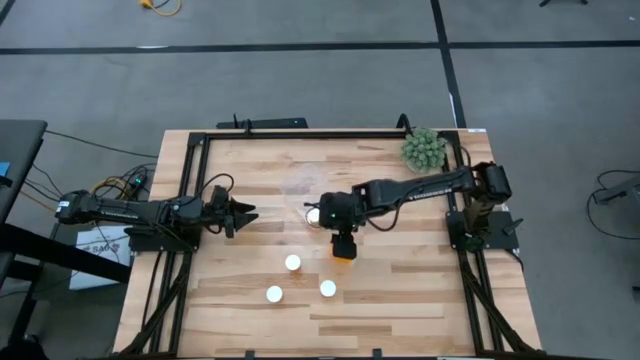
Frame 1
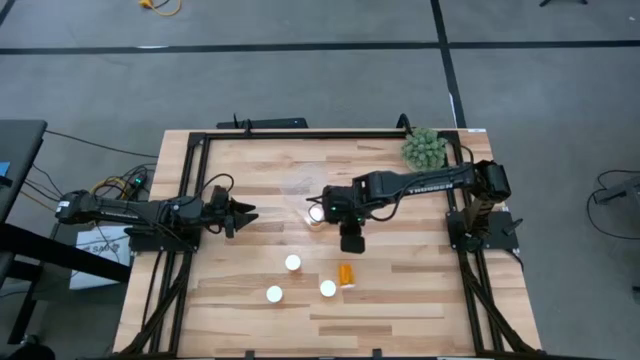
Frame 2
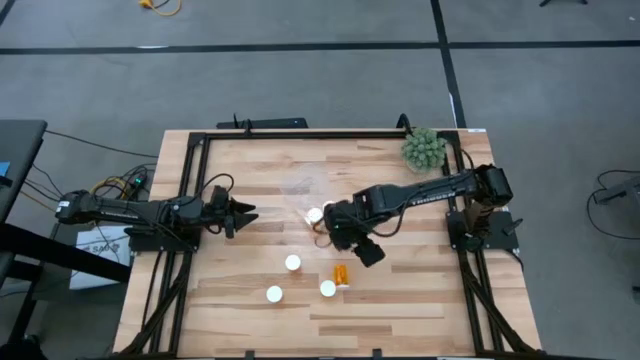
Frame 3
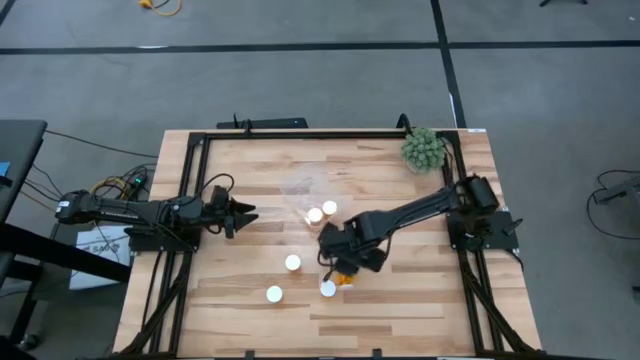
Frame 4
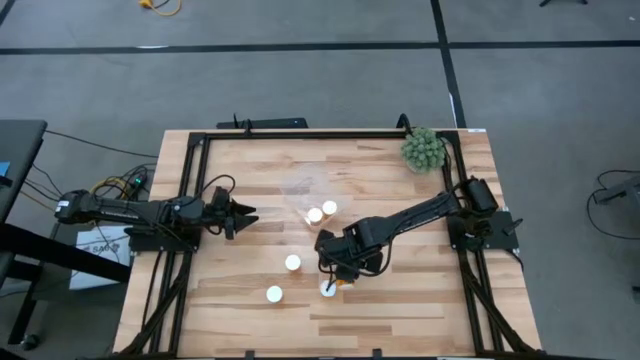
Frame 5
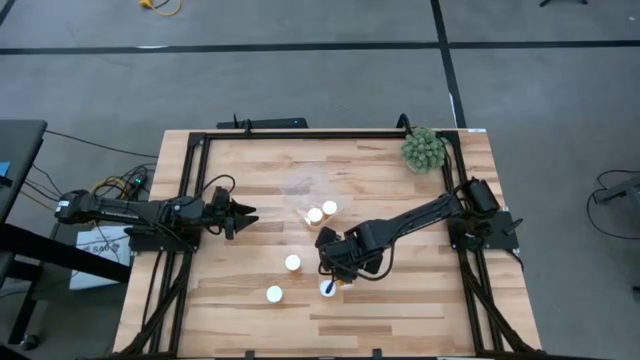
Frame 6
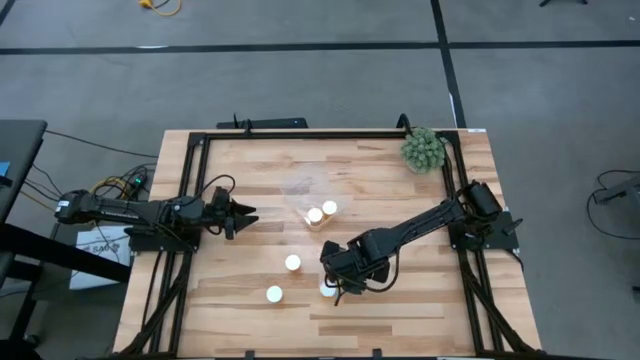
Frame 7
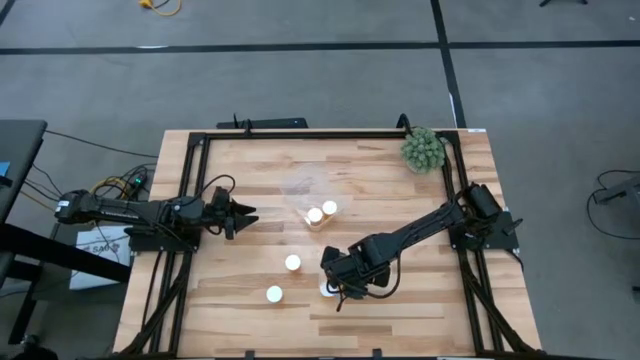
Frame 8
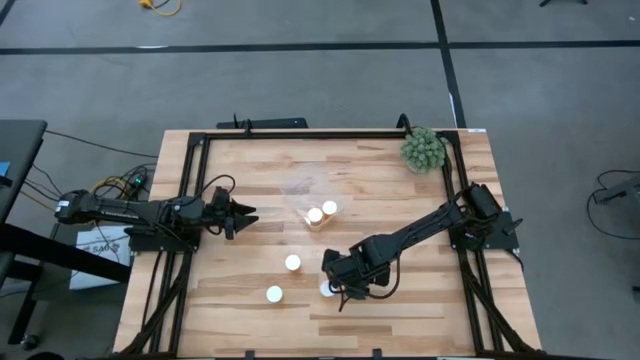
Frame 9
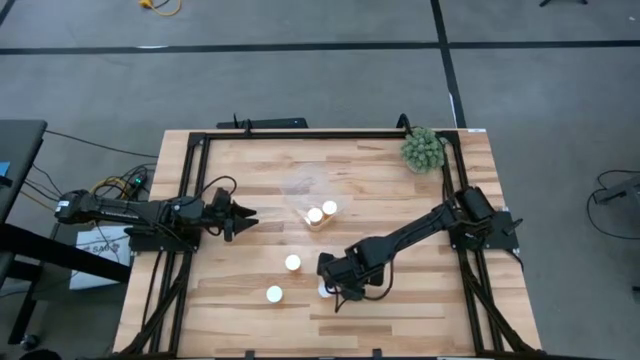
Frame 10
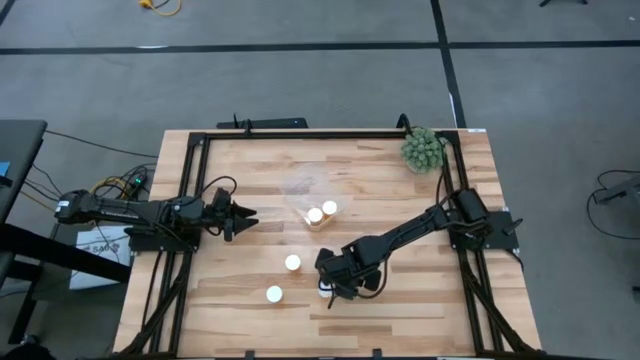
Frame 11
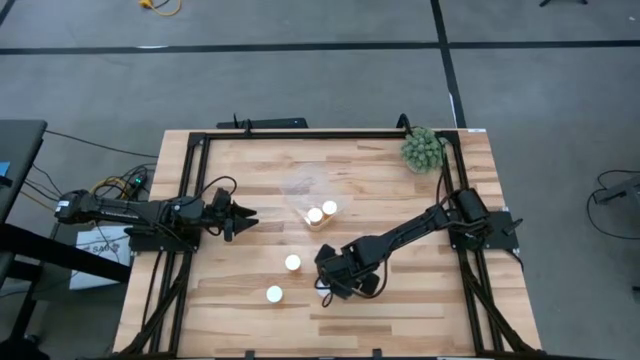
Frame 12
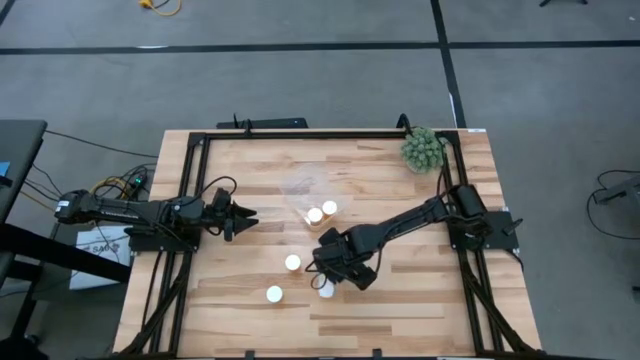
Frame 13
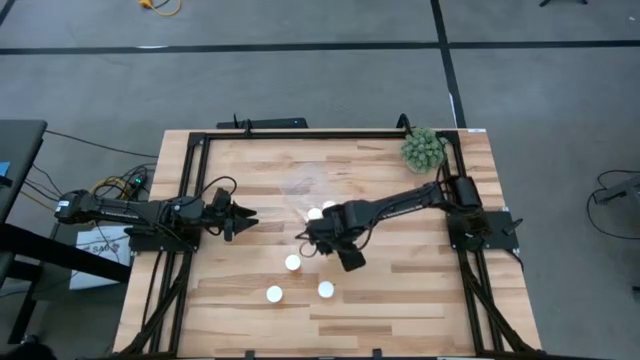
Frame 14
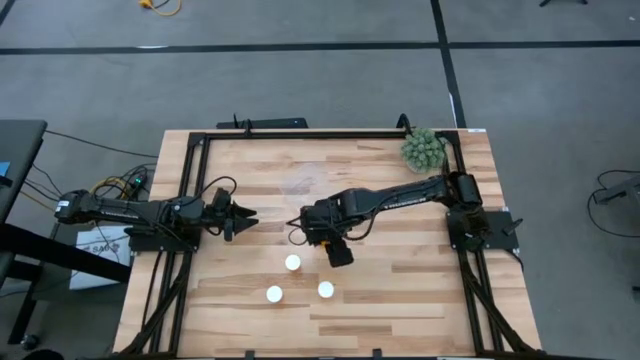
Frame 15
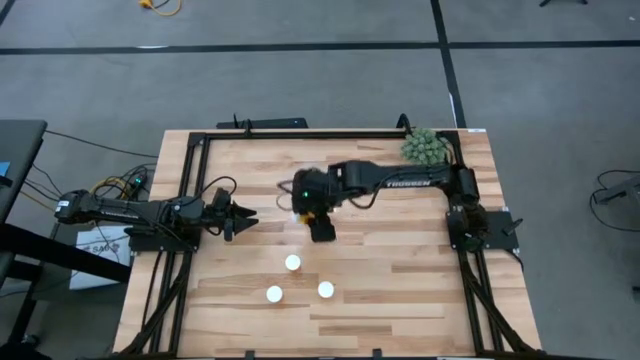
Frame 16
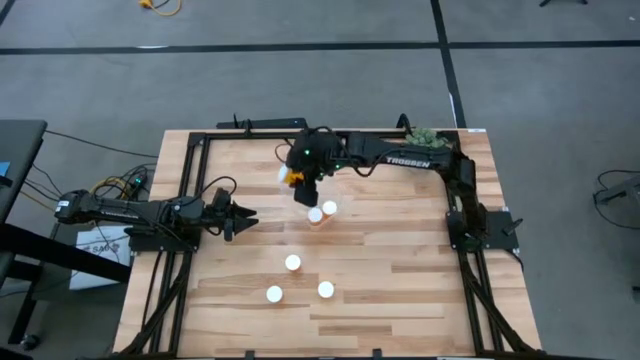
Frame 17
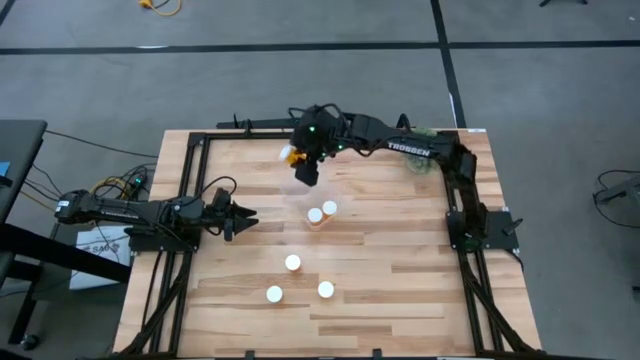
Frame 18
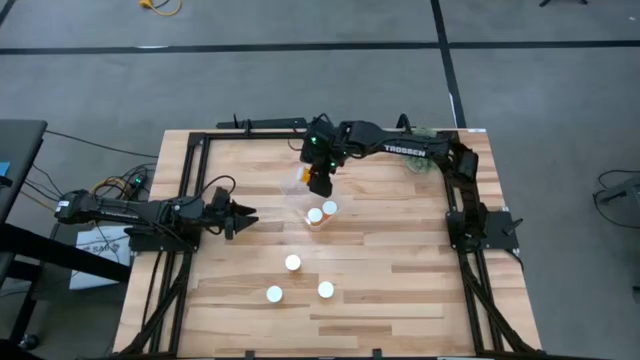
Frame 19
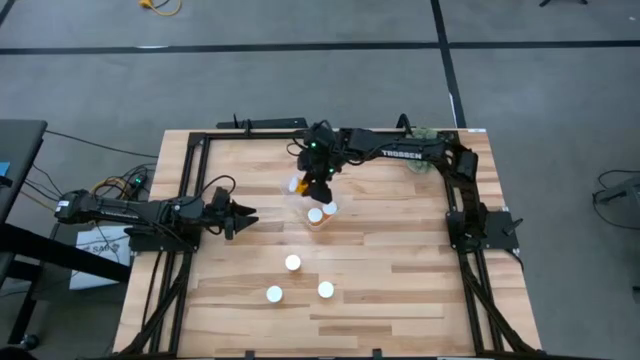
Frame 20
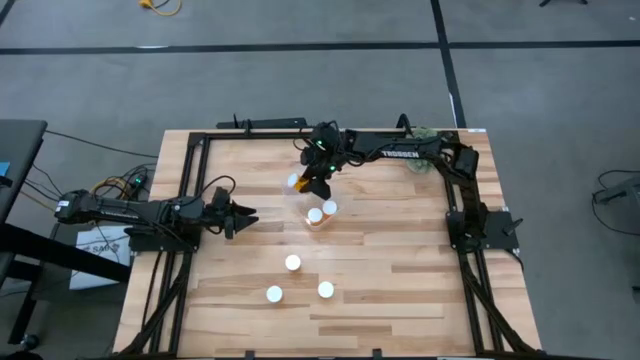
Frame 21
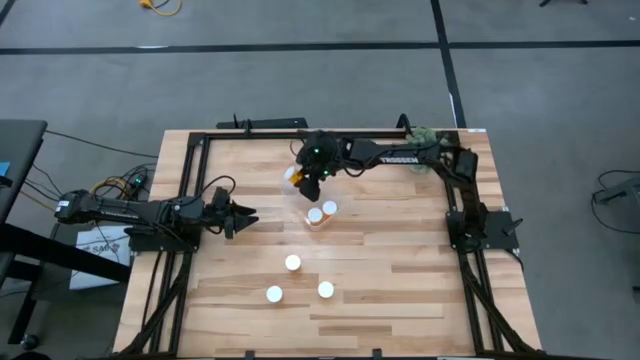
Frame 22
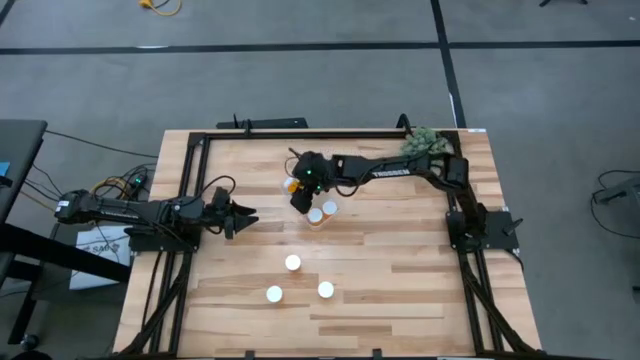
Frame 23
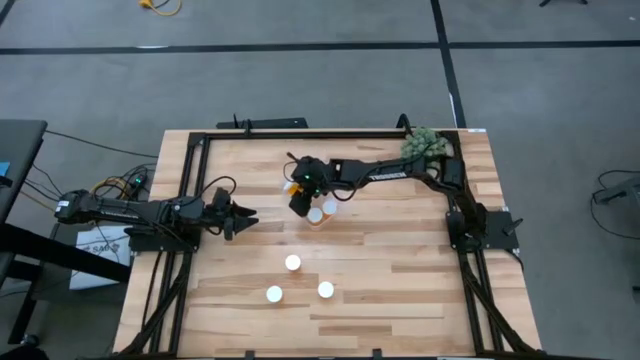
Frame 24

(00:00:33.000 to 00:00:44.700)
Task: Pick and place pill bottles into a basket
Put the orange medicine bottle into the transparent bin

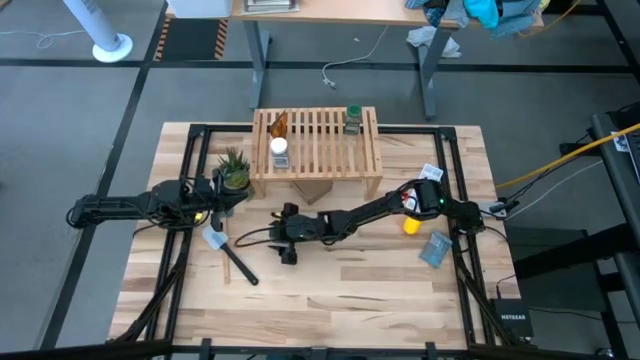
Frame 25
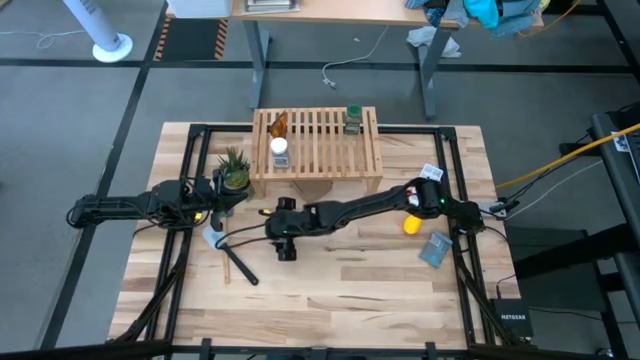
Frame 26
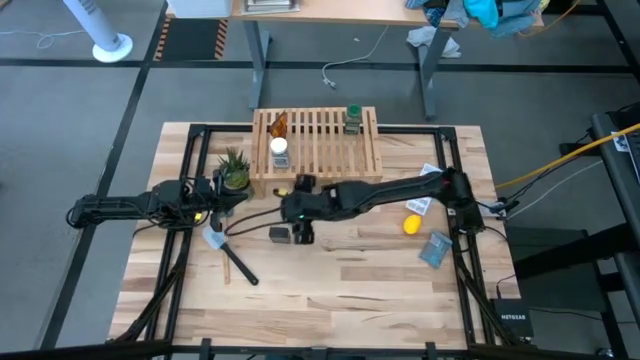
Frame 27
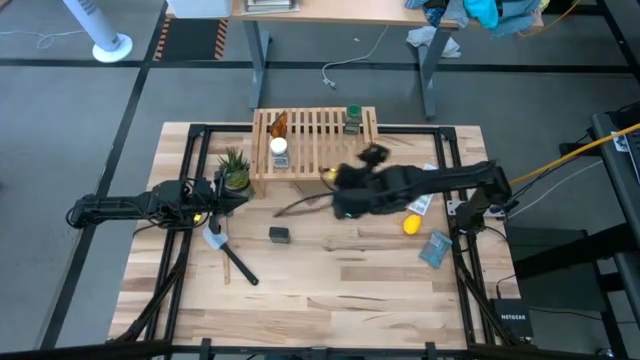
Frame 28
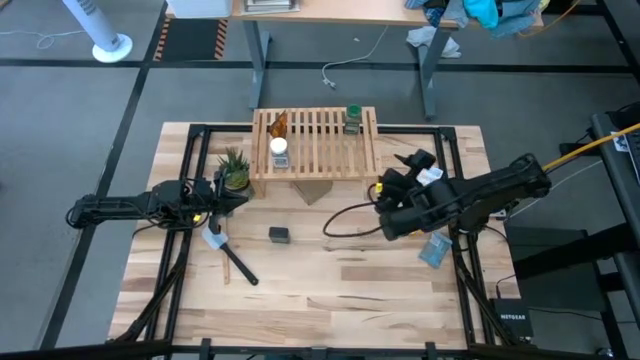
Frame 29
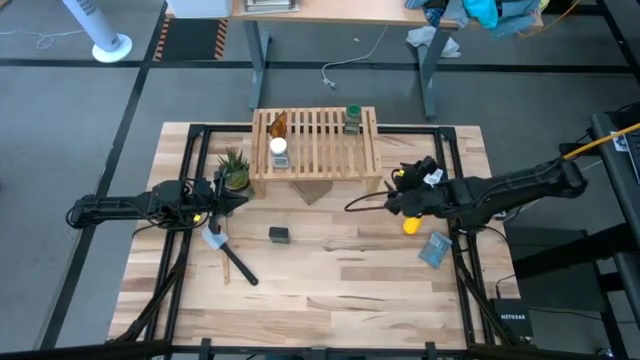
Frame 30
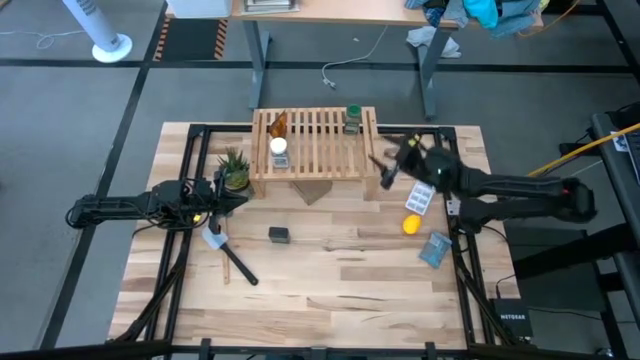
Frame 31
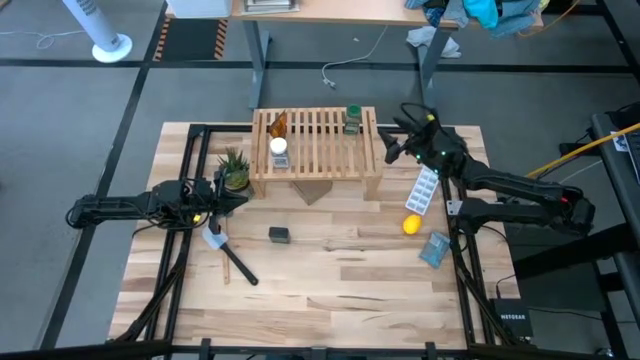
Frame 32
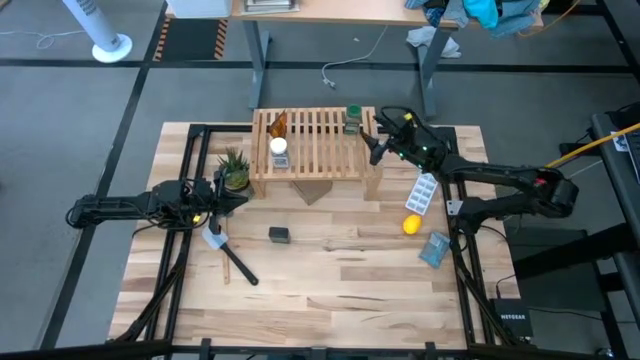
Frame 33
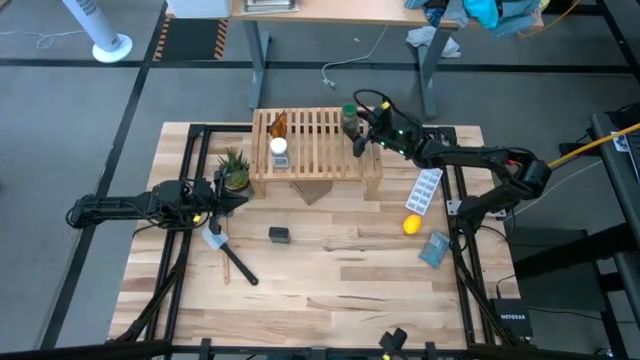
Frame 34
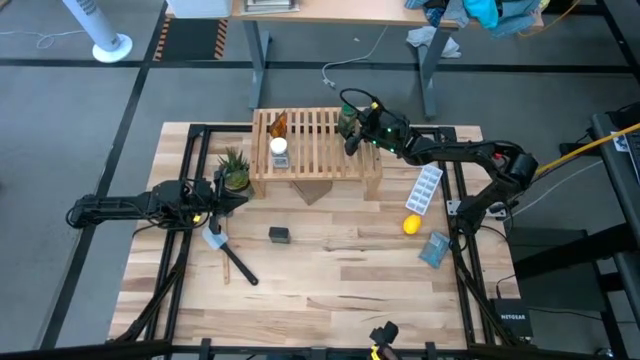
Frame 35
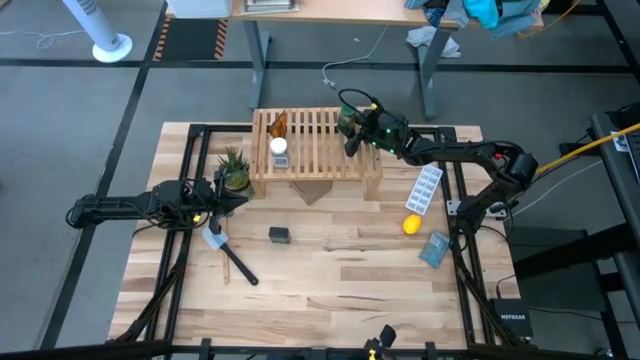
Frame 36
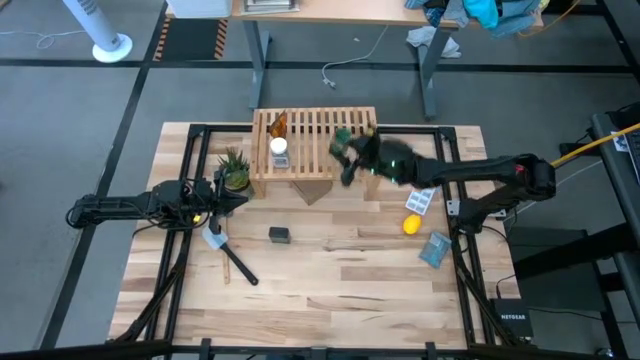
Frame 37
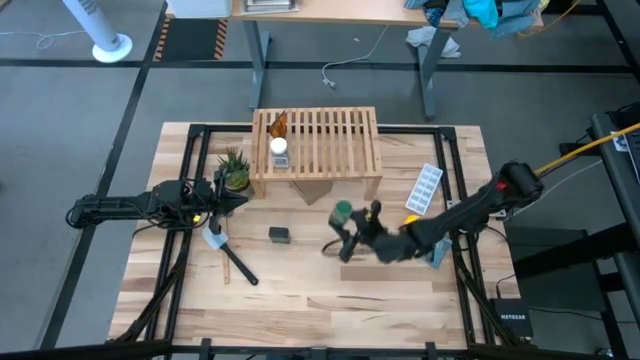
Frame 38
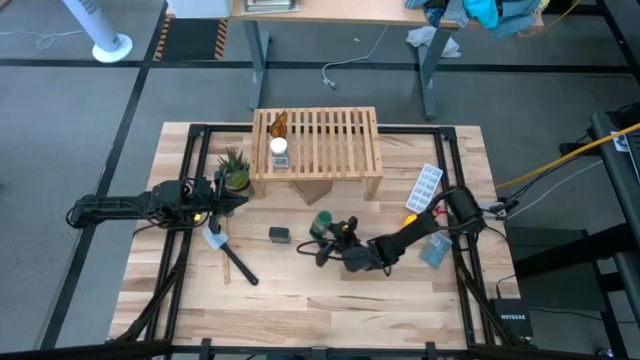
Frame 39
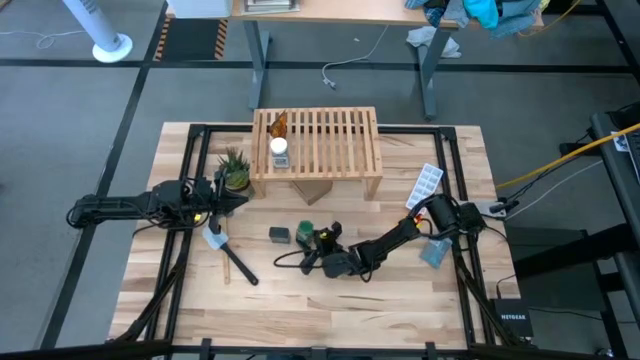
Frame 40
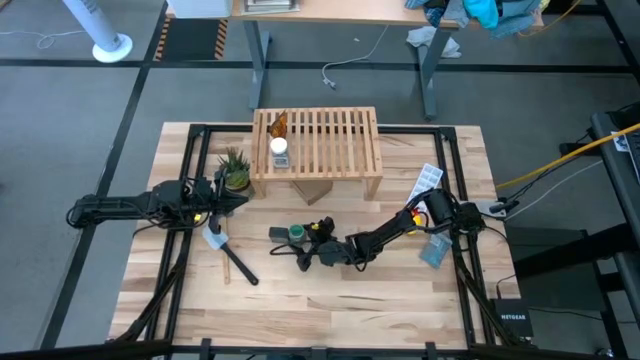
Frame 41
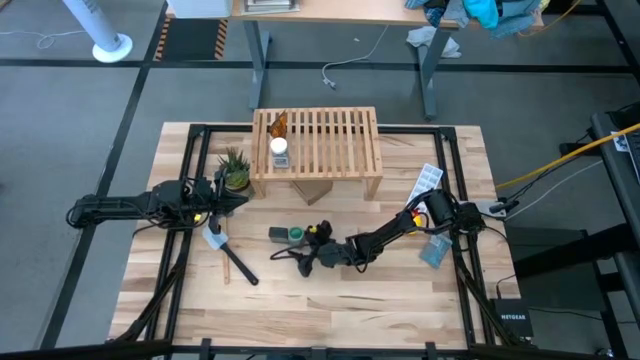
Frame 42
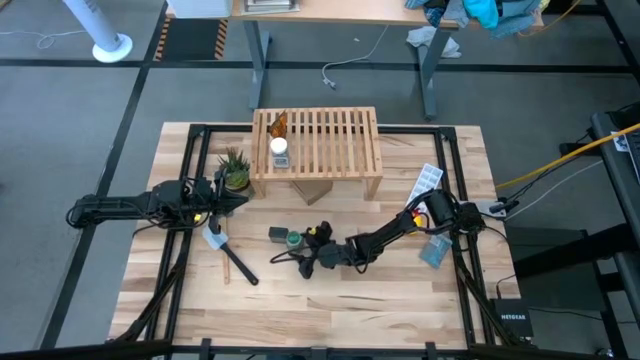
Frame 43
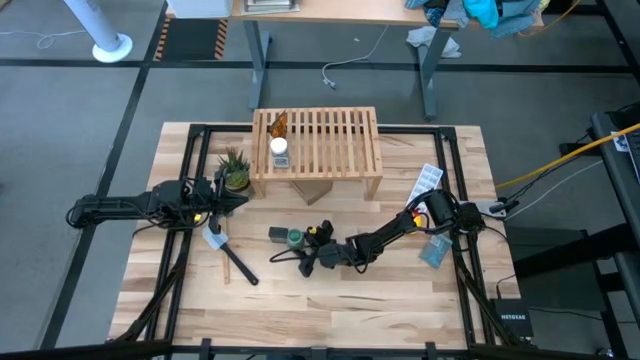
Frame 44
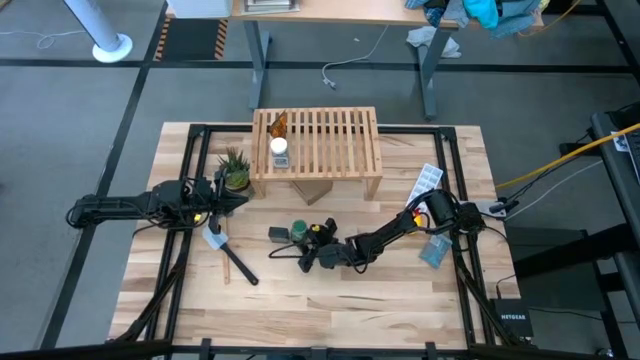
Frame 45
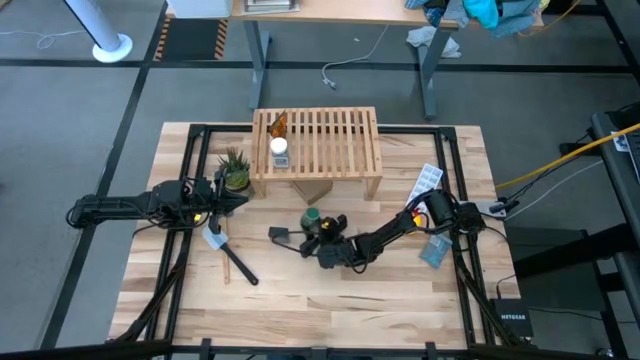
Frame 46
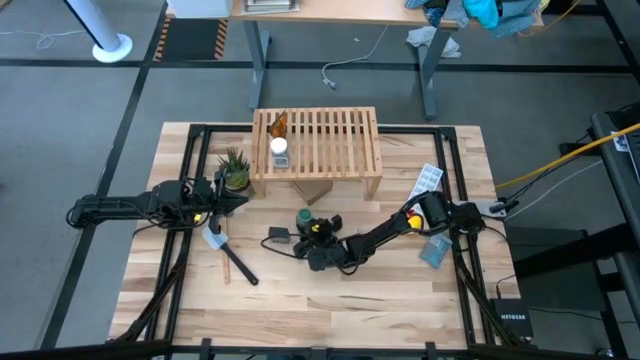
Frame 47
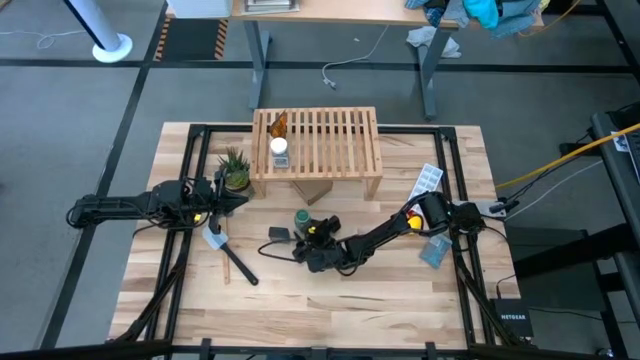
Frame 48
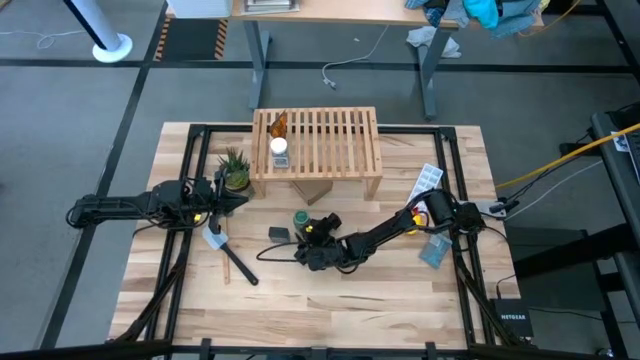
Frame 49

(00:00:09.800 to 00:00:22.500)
Task: Shelf spices
Remove the green seasoning bottle from the shelf to the table
